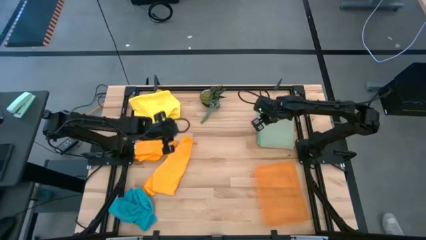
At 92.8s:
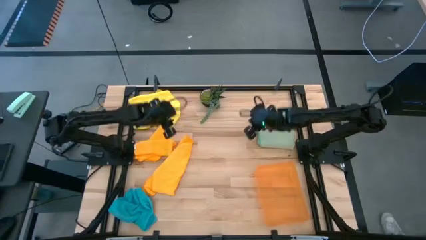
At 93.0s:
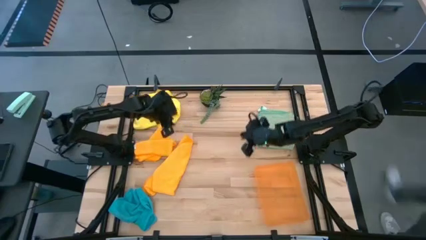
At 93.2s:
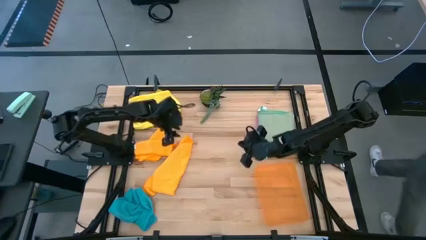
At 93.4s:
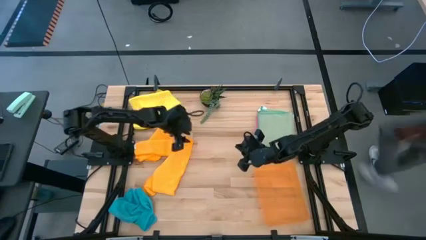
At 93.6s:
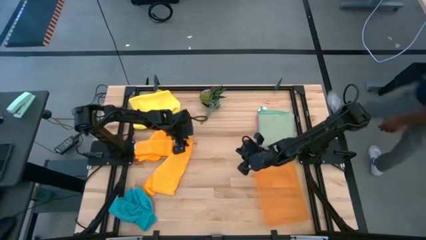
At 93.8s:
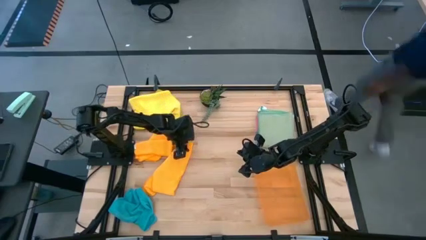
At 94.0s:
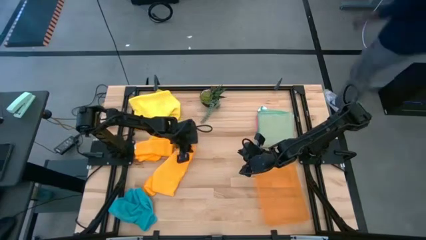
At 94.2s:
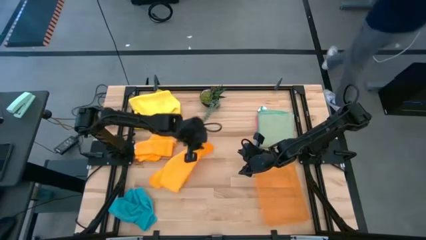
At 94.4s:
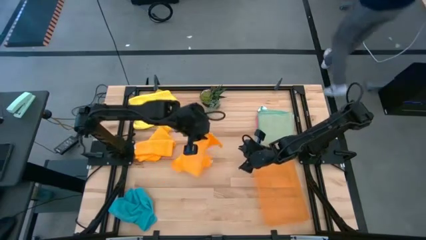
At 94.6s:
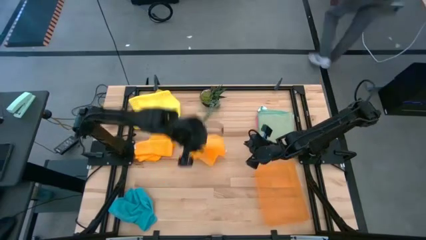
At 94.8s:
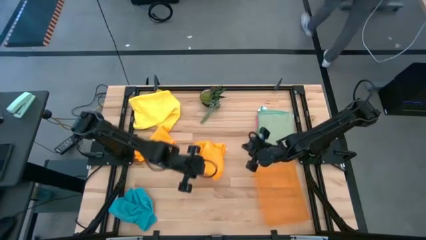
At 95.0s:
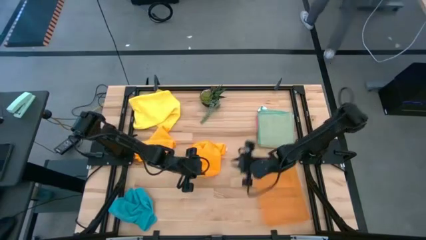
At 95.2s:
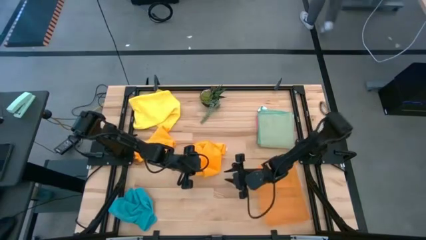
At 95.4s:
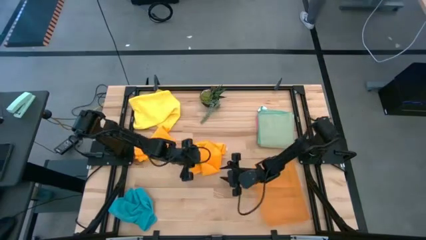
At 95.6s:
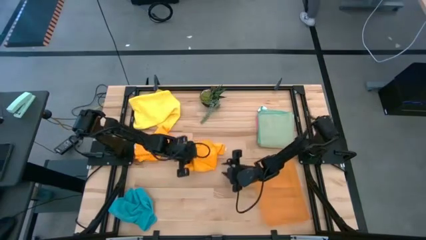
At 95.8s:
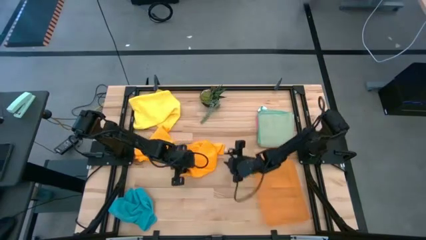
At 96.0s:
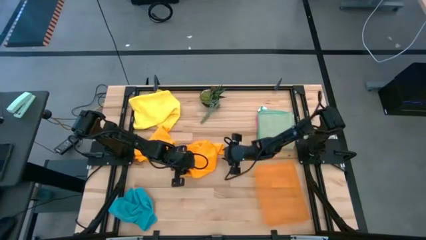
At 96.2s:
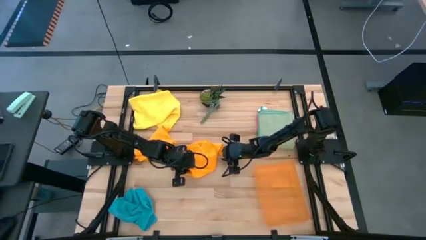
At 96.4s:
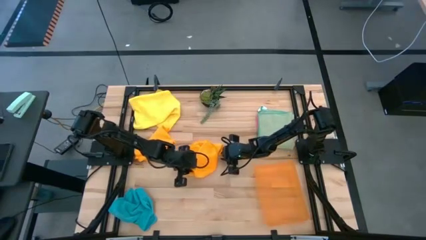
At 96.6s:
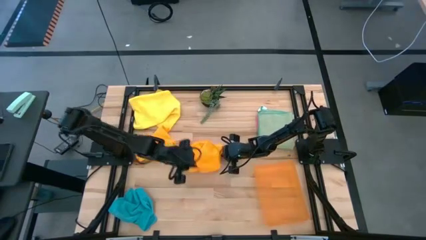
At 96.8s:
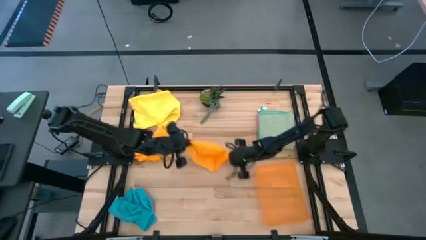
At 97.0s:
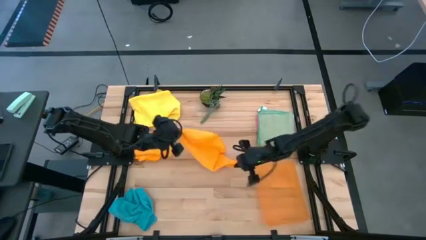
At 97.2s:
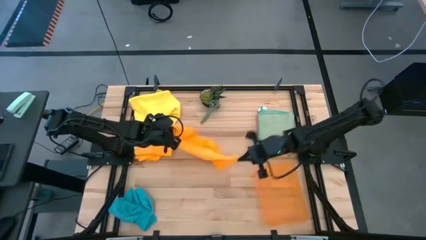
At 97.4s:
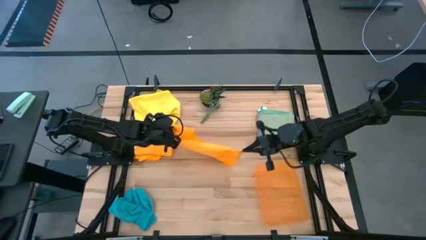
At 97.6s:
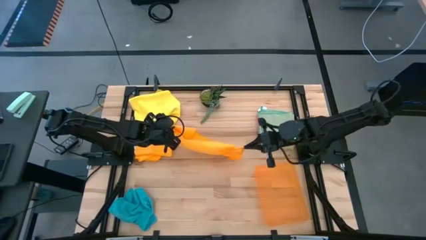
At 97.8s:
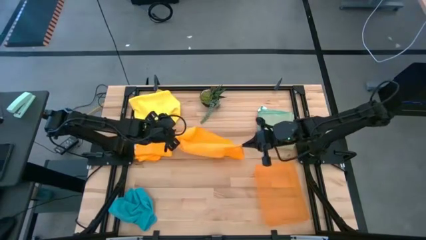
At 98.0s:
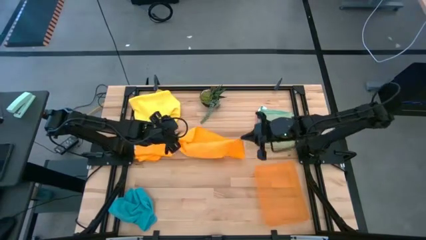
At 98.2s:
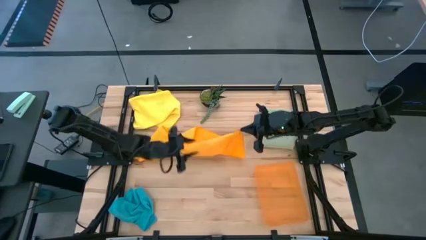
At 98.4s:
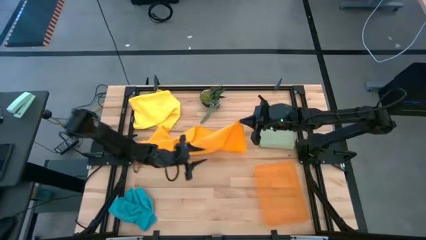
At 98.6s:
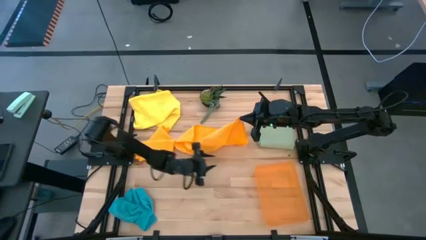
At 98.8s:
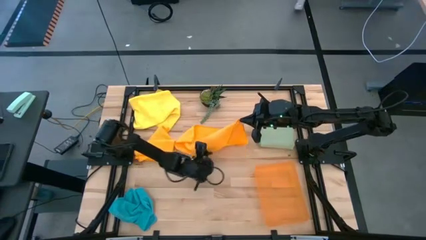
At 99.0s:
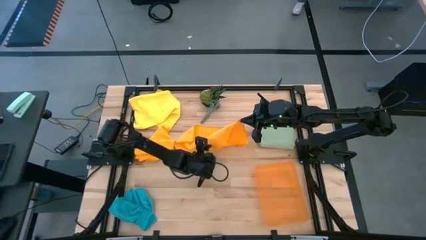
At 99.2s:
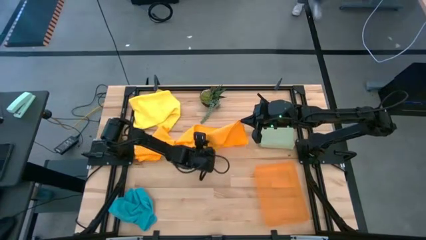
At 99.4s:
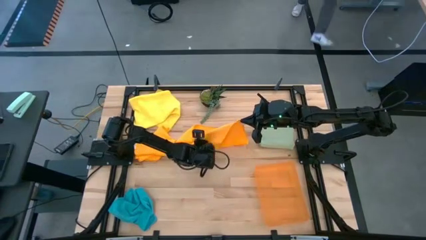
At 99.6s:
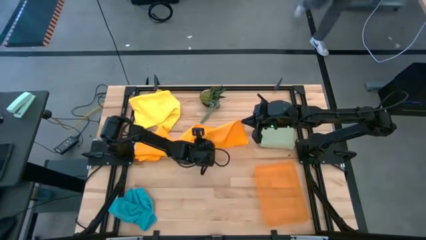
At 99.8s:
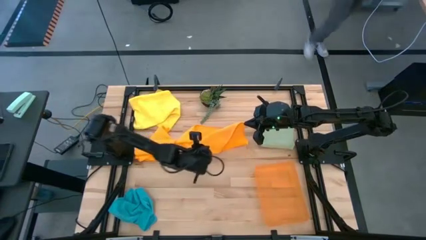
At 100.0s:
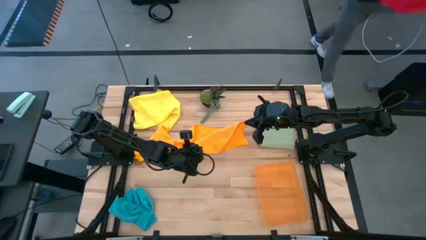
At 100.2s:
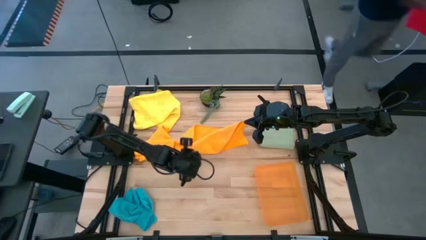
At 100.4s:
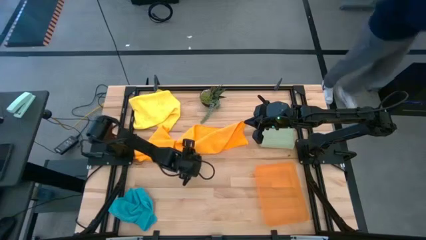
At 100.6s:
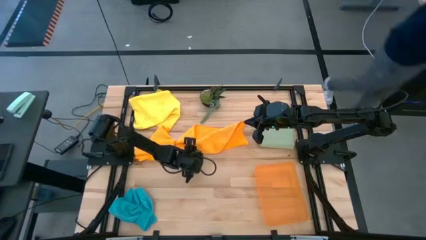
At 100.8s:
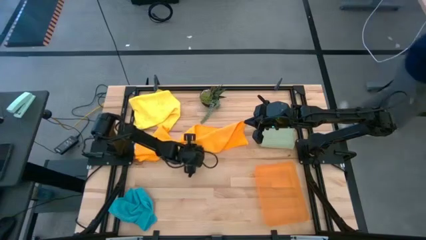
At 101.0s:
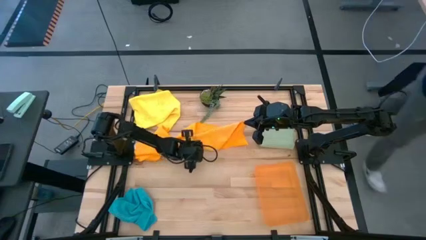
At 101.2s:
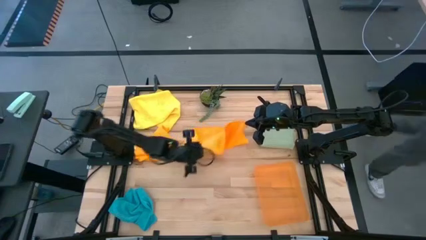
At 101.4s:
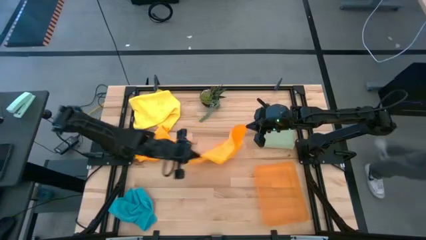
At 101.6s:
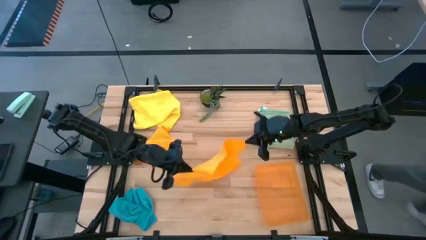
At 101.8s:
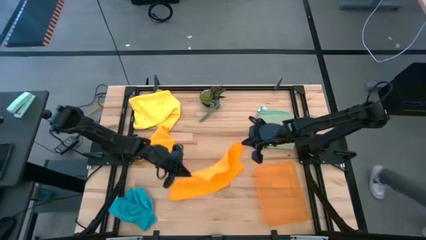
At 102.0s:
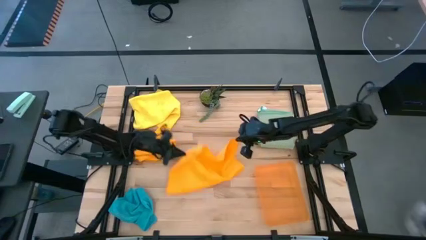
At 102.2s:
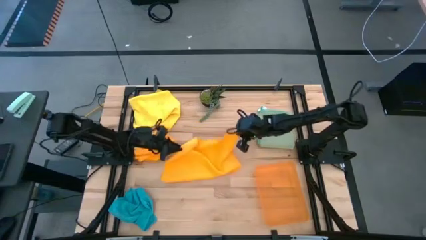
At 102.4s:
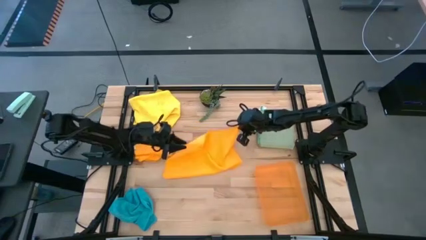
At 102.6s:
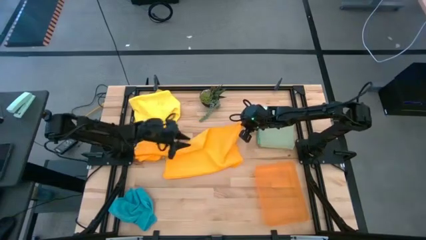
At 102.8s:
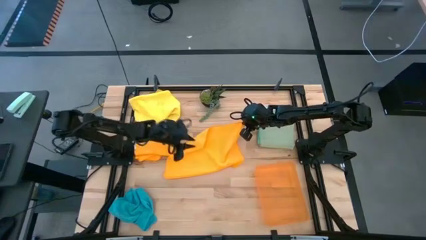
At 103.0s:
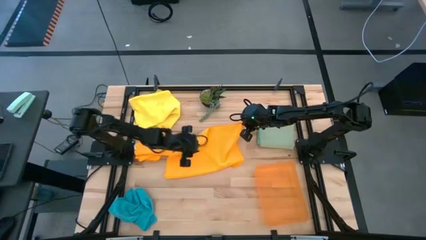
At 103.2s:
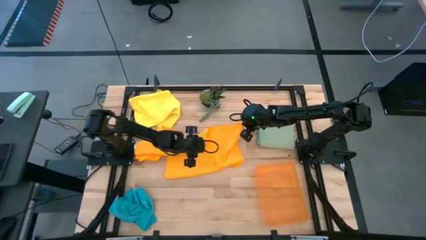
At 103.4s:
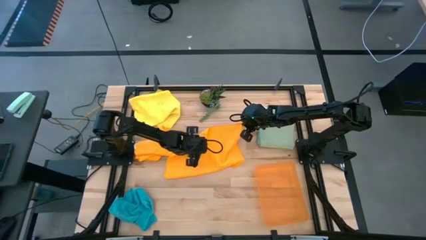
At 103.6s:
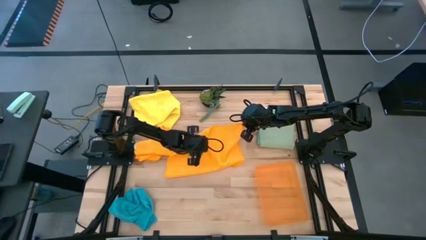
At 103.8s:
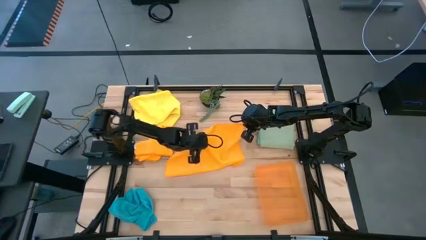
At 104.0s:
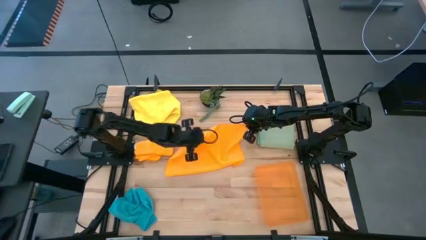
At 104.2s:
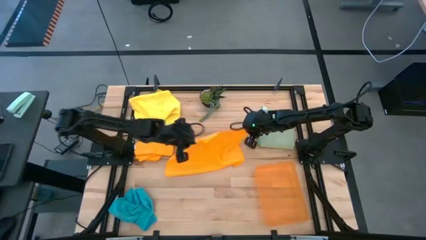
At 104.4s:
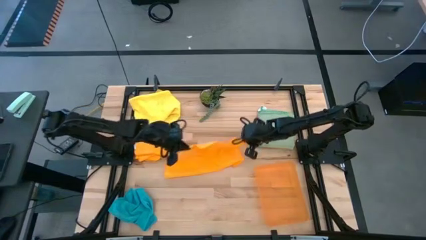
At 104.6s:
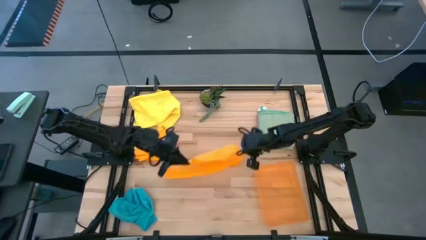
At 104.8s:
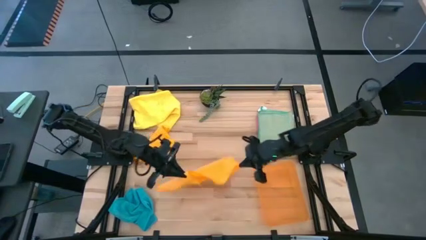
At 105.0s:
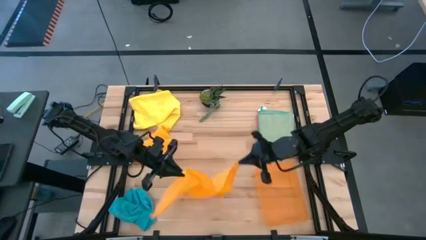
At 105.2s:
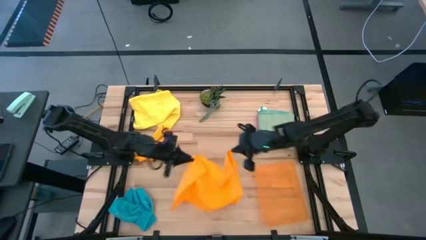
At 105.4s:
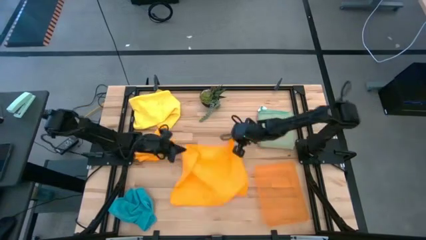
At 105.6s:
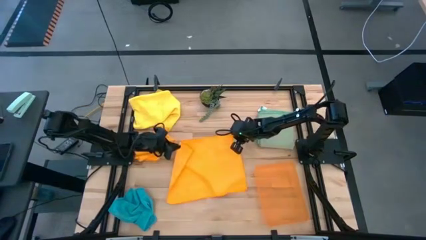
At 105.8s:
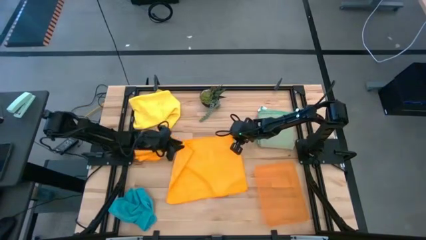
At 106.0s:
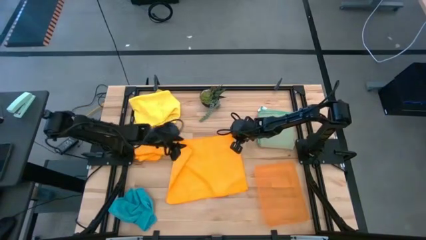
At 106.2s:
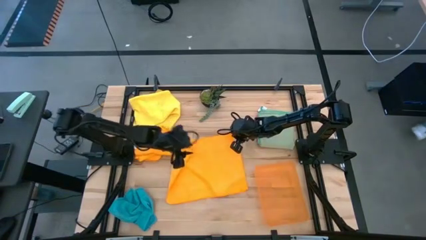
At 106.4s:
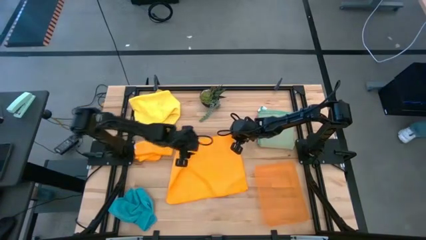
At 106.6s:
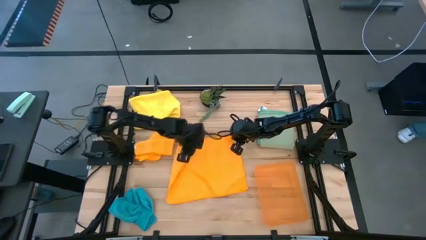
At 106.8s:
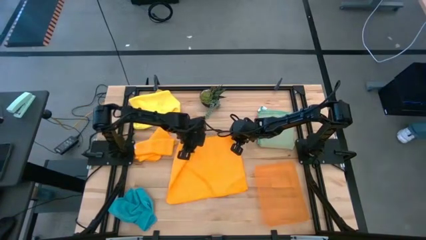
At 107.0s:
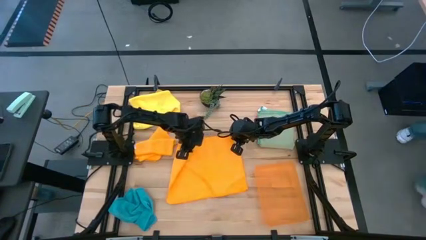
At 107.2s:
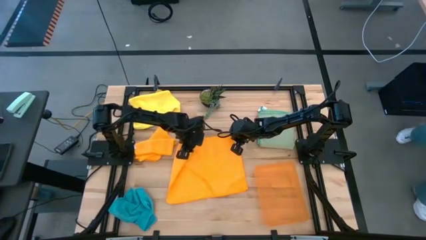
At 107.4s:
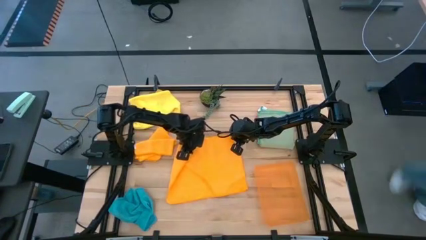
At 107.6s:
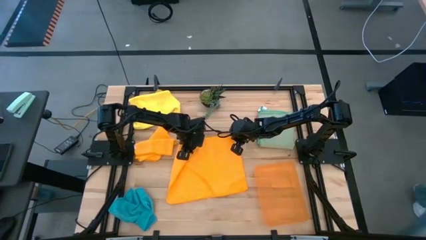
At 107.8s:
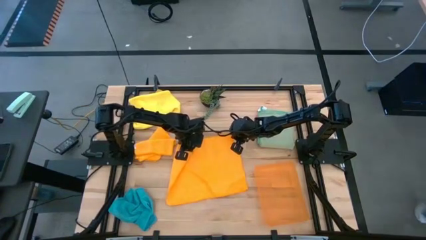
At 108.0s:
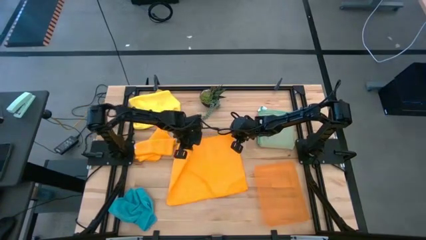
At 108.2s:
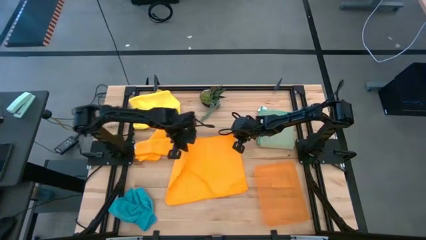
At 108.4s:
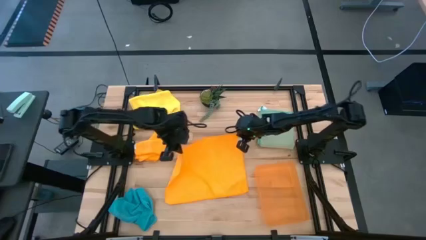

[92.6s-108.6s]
Task: Fold microfiber towels
Fold the right orange microfiber towel

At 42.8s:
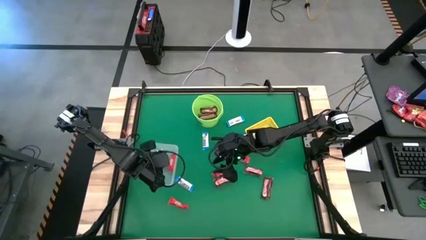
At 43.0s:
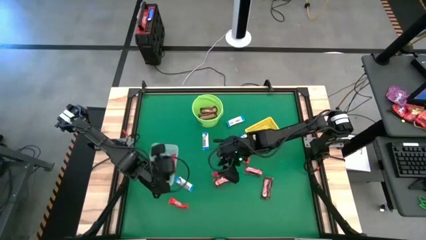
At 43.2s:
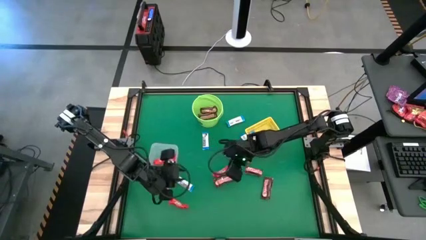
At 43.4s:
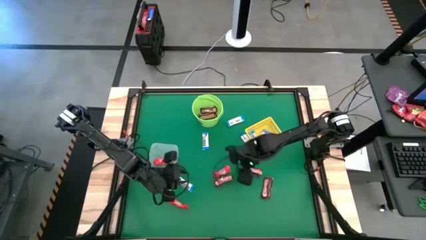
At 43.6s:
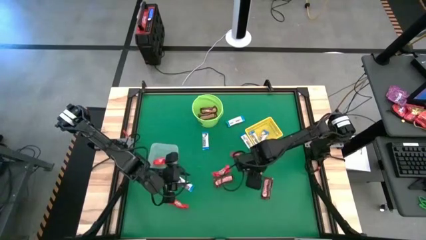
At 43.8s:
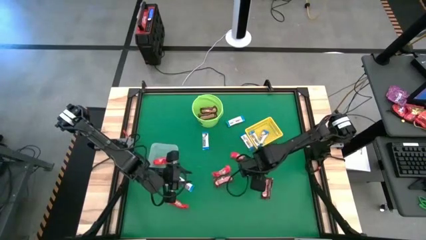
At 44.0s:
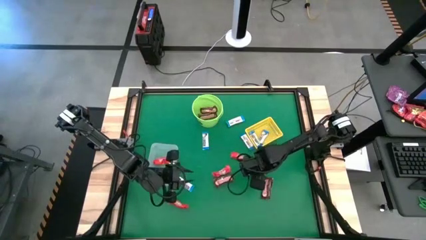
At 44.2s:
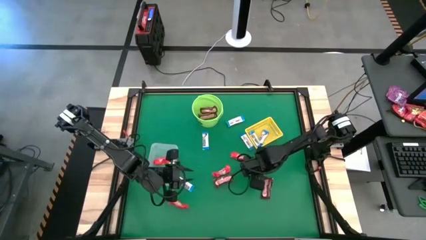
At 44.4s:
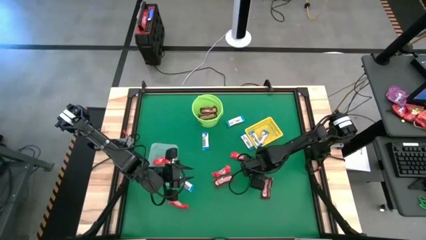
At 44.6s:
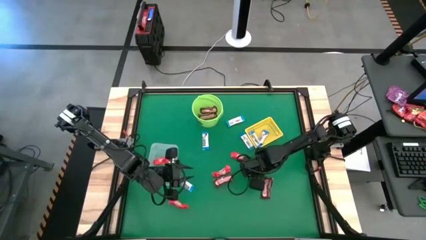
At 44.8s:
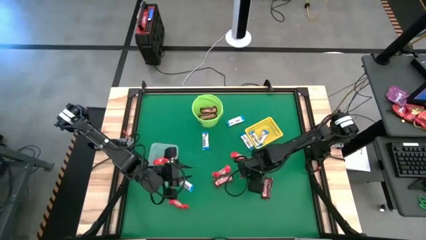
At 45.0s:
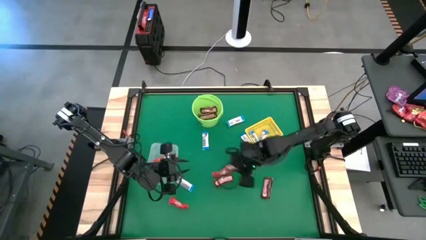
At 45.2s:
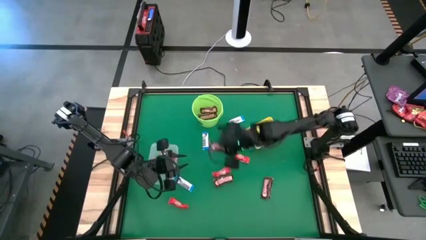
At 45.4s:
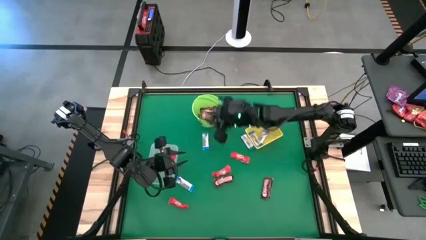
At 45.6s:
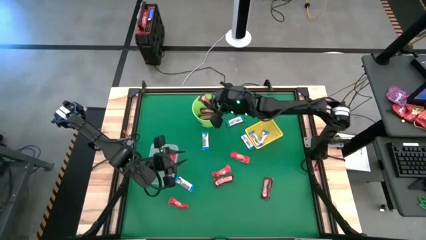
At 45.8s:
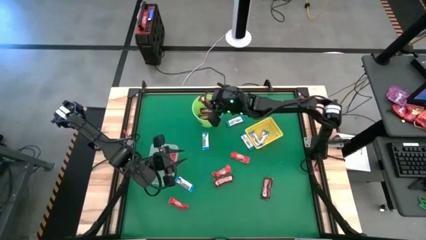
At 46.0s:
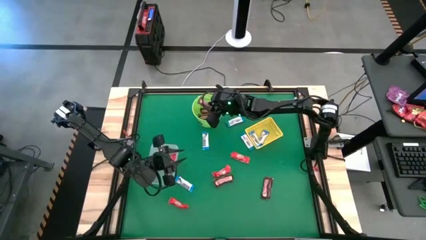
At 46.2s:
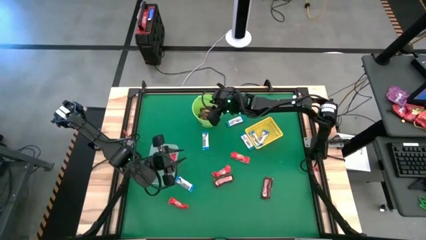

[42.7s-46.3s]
Task: Sort candy by brand, put in halloween buckets
Put the brown chocolate bar into the green bucket
